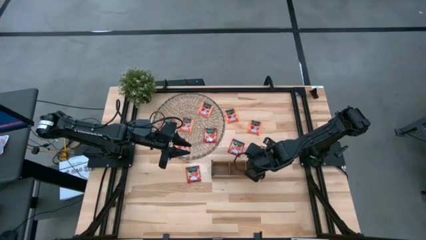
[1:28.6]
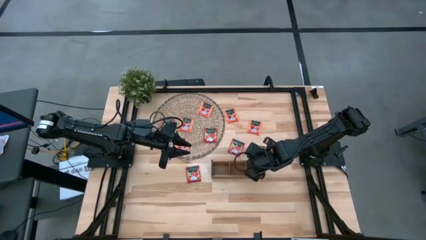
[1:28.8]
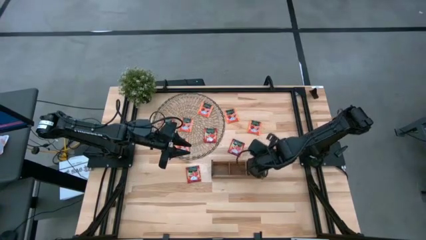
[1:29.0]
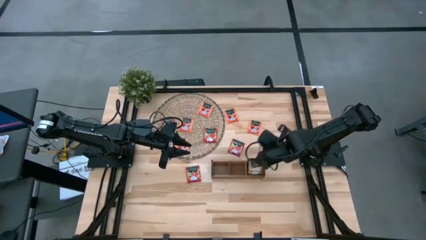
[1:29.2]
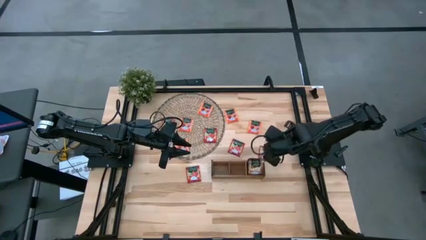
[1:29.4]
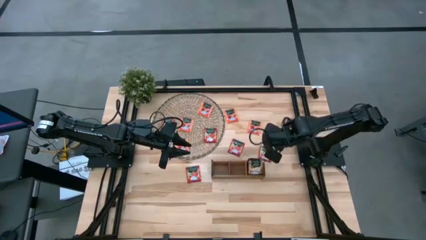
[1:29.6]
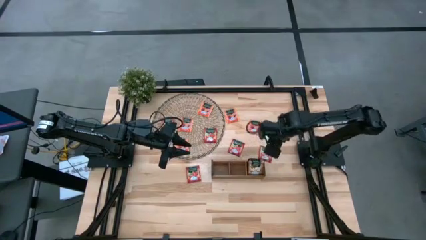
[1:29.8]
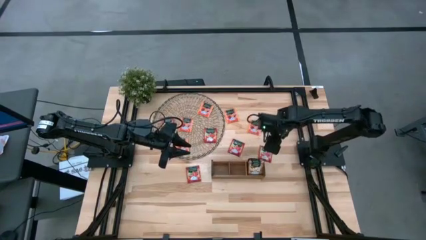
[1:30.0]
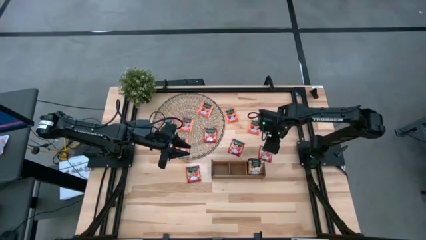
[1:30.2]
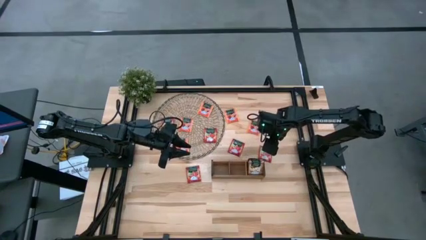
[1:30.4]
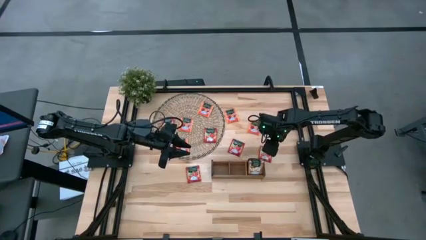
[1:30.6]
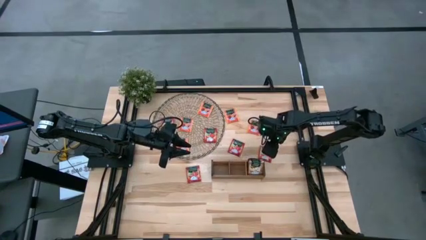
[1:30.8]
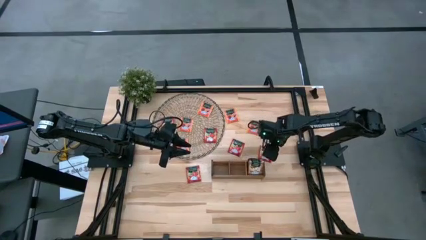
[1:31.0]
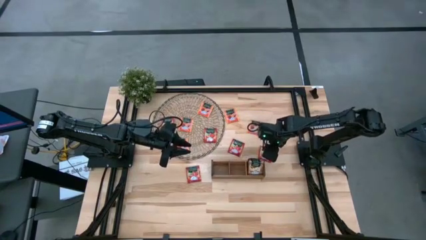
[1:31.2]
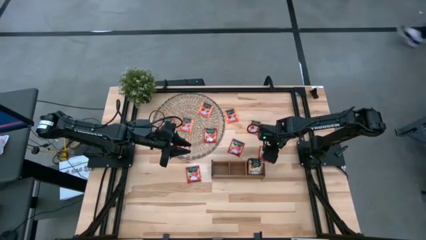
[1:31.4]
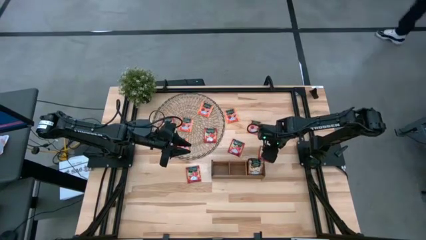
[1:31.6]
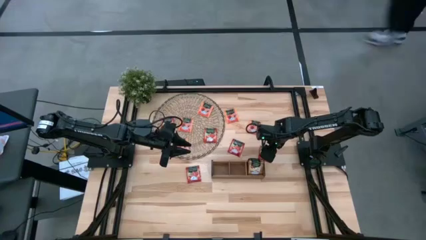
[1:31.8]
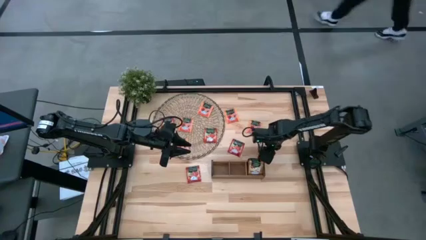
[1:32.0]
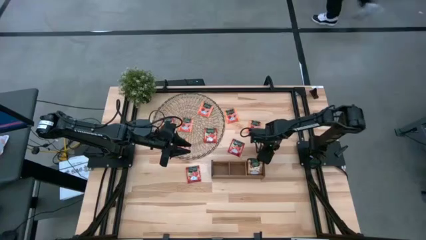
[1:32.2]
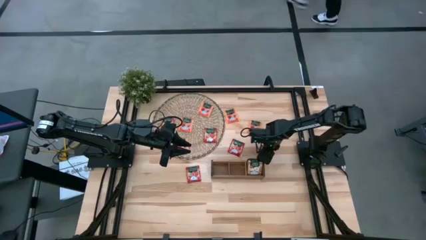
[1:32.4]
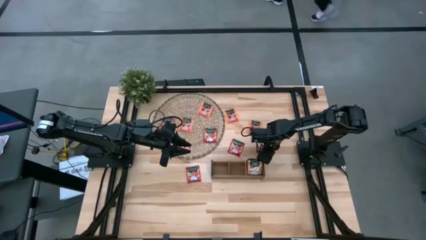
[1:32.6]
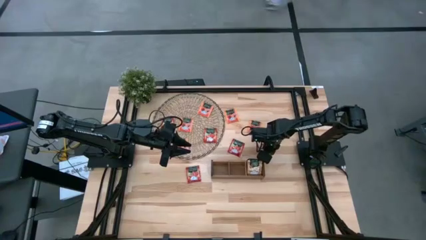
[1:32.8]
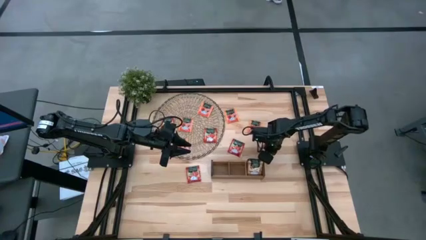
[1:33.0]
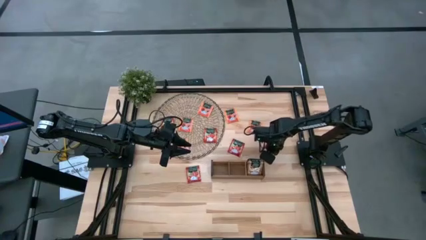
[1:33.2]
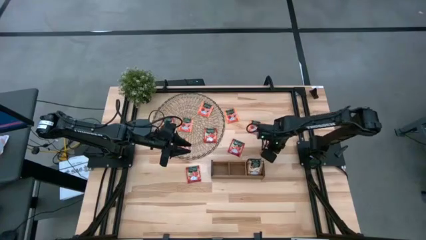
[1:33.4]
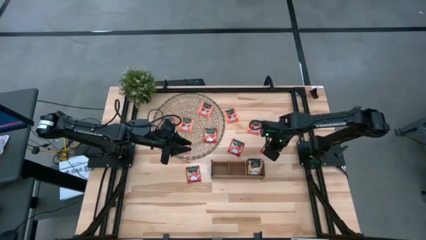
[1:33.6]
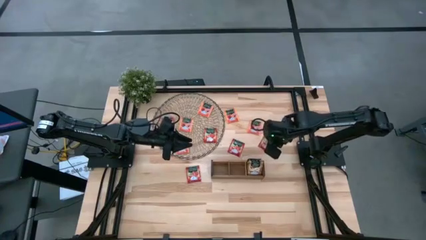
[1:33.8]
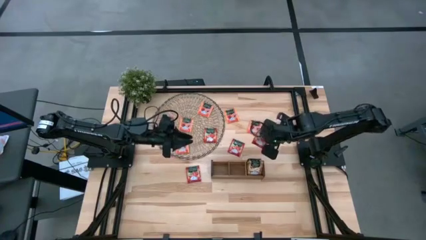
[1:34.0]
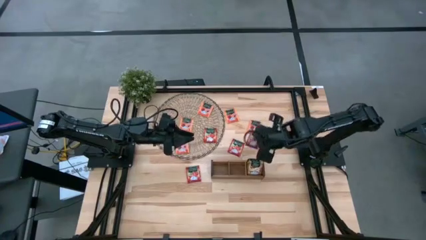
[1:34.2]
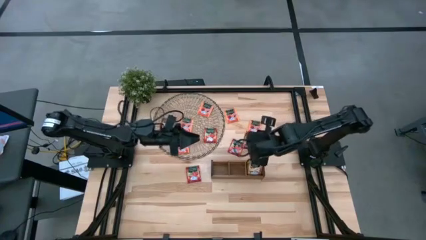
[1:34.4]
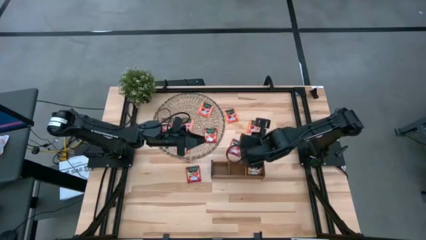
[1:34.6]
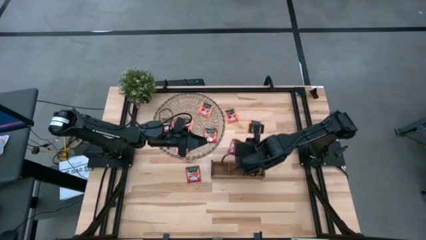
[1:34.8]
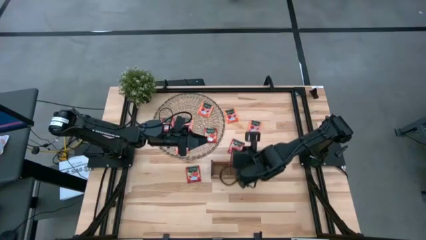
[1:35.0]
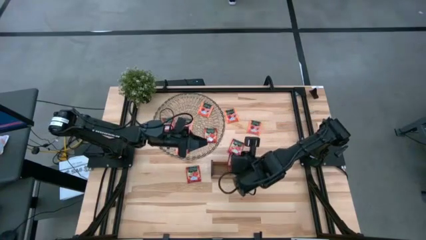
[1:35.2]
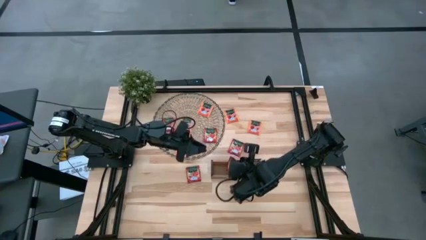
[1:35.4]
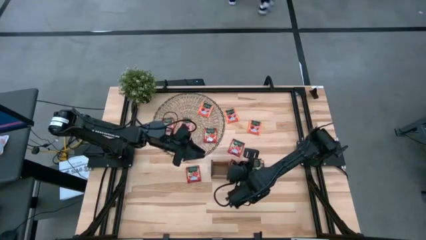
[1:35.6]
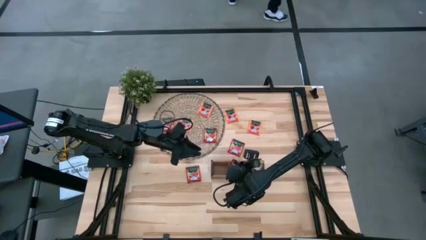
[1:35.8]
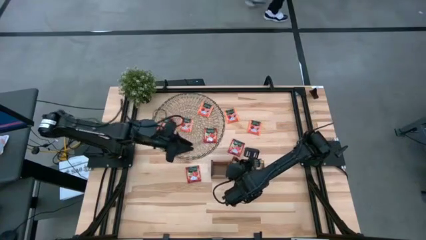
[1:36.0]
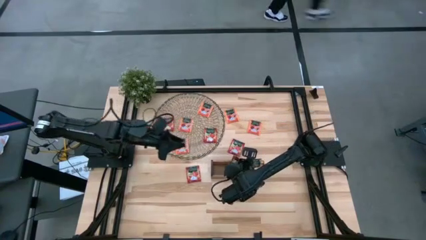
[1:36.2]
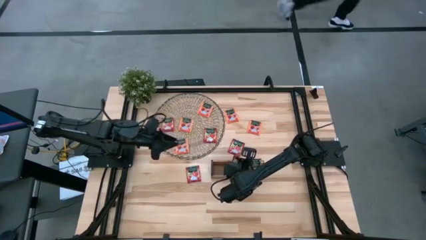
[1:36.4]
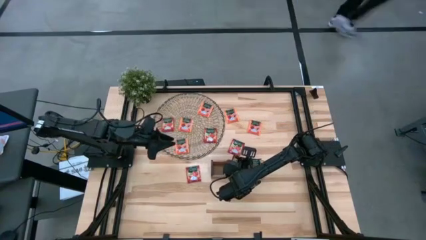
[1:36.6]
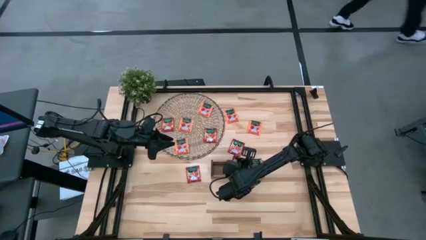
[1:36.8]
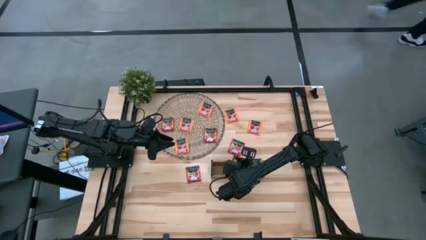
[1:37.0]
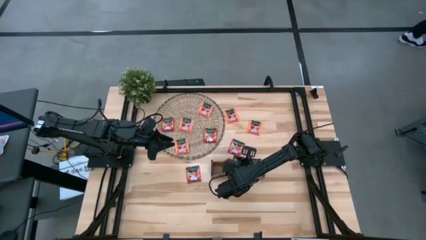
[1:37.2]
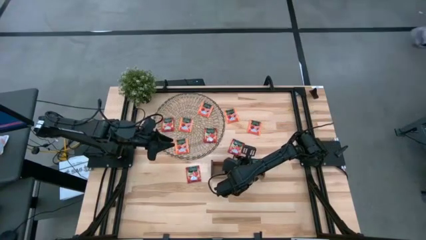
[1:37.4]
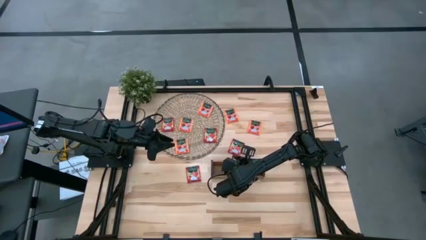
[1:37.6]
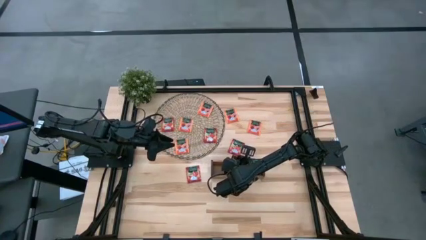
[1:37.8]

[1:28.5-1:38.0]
Task: Pick & Place Tea
Put the red tea bag into the middle slot of the wooden organizer

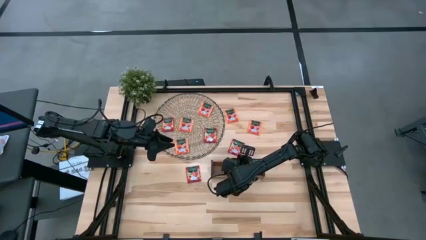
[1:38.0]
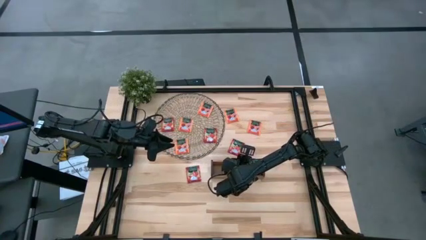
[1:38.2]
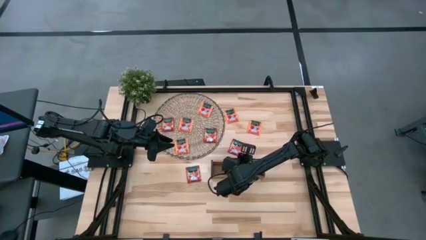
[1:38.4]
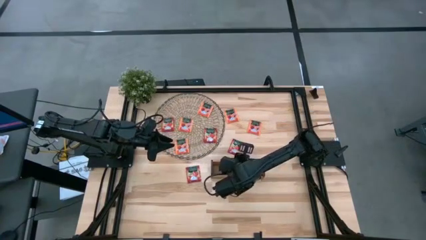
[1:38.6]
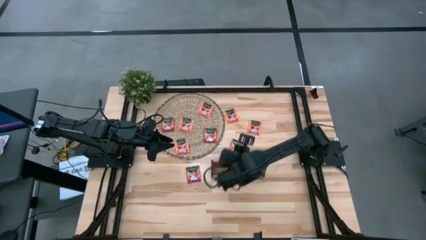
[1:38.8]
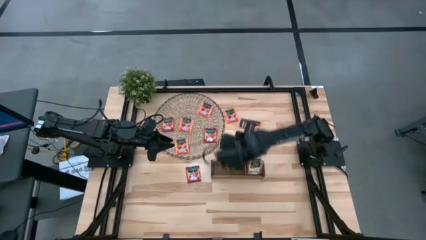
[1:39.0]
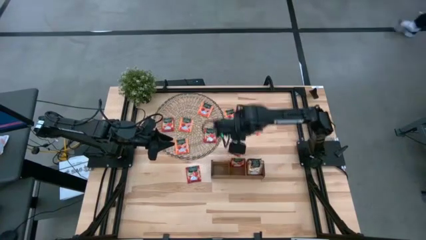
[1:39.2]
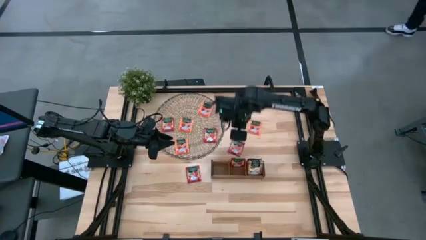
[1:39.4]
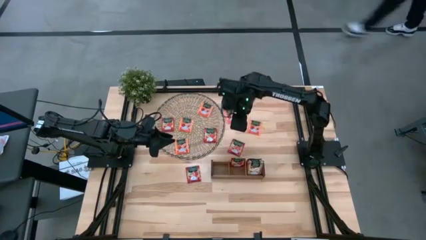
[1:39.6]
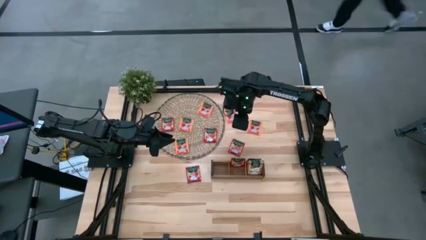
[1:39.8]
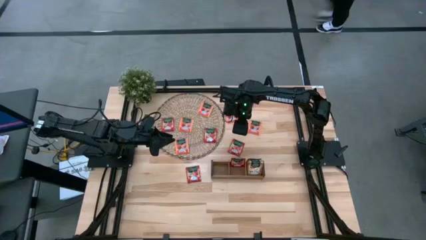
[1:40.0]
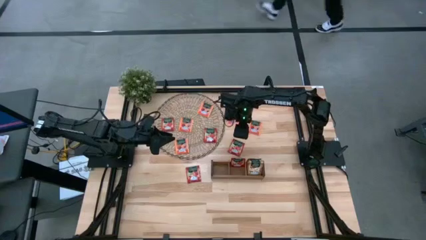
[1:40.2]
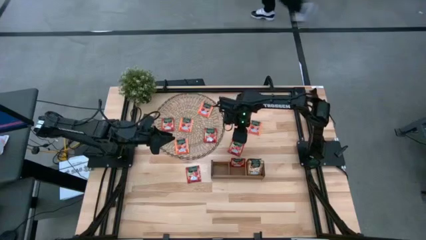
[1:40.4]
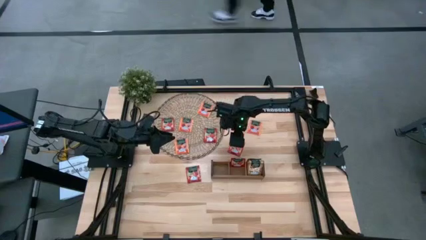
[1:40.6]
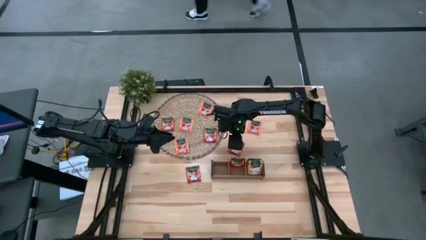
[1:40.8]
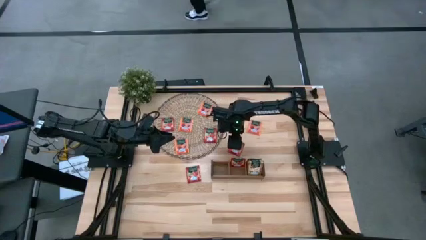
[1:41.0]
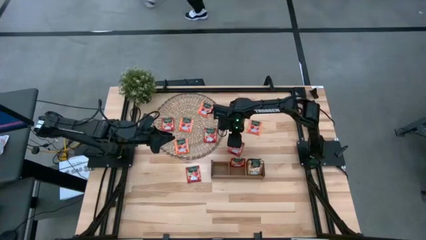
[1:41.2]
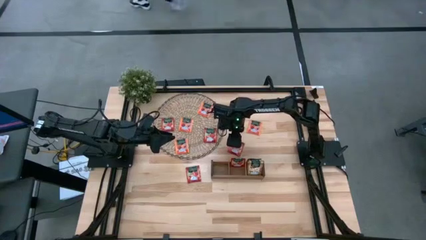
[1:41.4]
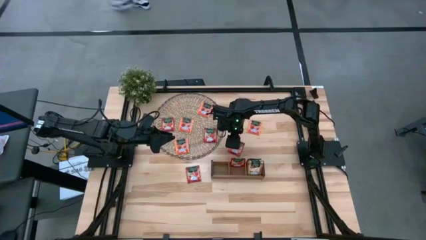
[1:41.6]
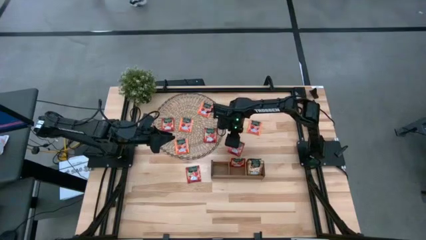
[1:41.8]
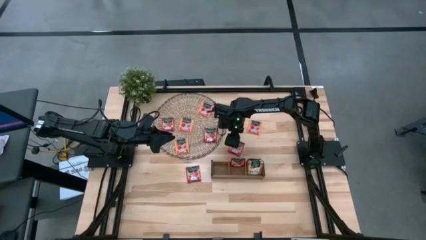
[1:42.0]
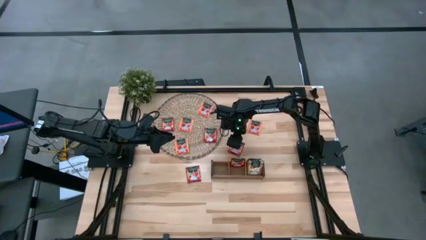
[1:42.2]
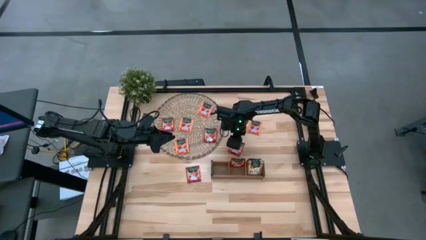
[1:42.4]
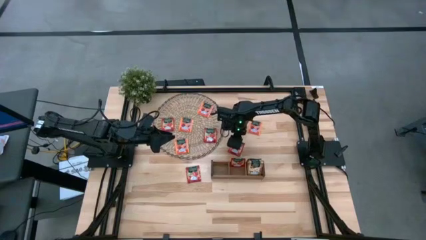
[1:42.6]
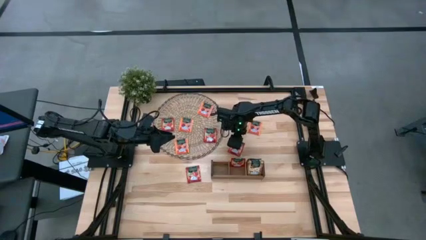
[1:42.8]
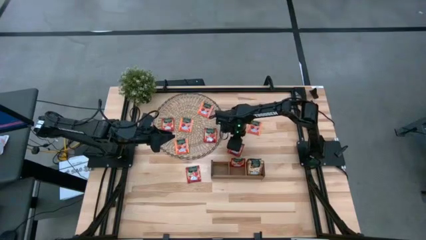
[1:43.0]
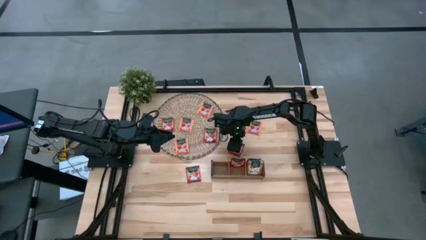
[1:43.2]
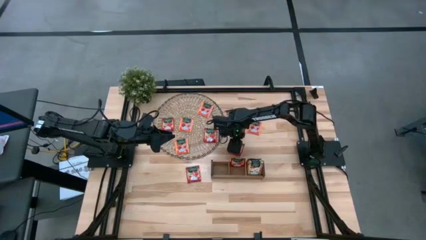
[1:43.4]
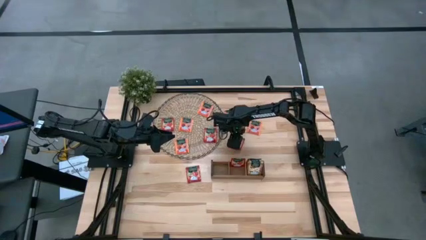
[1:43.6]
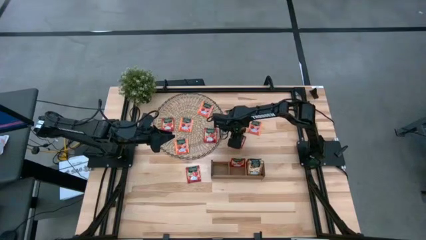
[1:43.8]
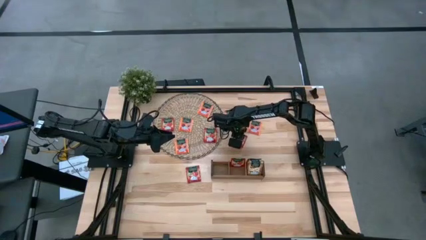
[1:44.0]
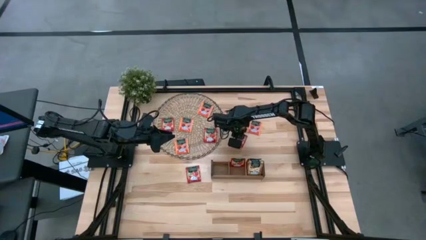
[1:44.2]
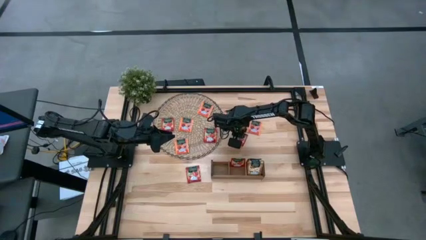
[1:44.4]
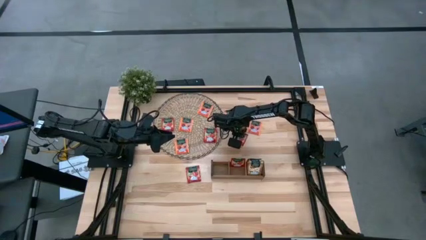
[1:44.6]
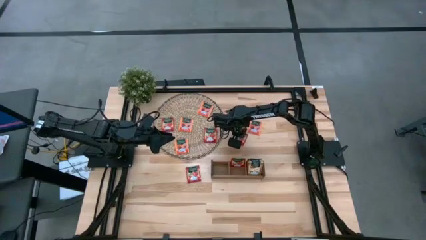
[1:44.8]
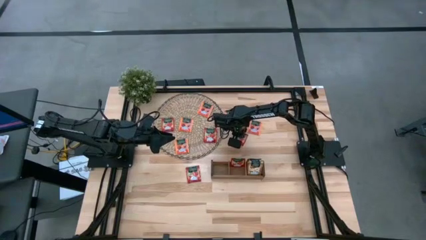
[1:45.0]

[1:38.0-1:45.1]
Put the red tea bag into the middle slot of the wooden organizer
